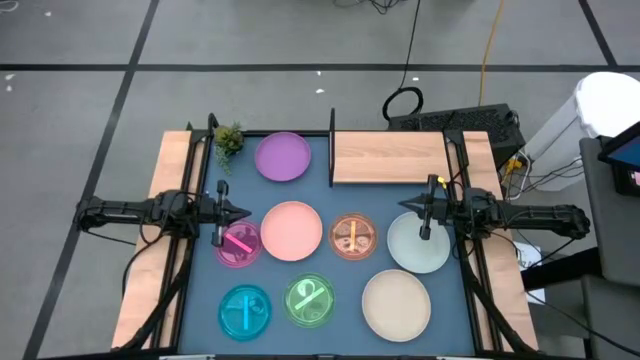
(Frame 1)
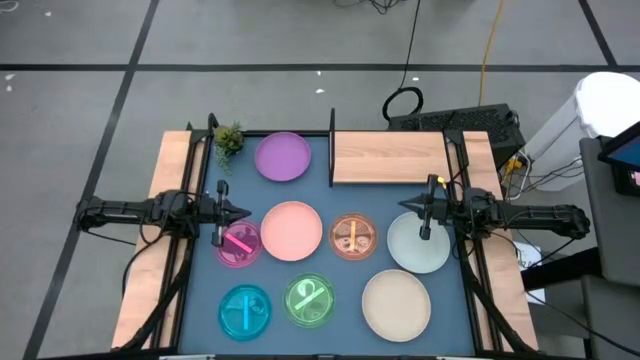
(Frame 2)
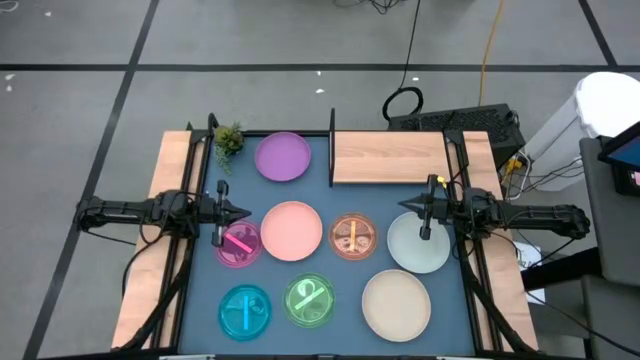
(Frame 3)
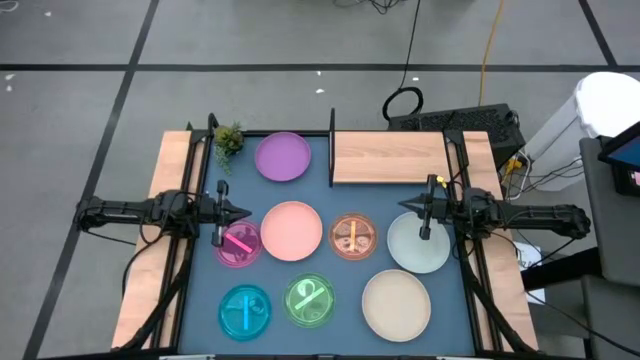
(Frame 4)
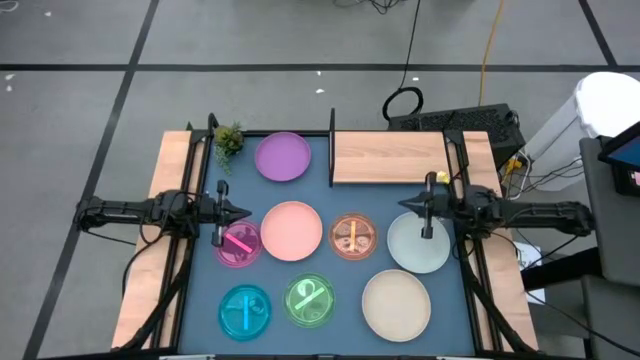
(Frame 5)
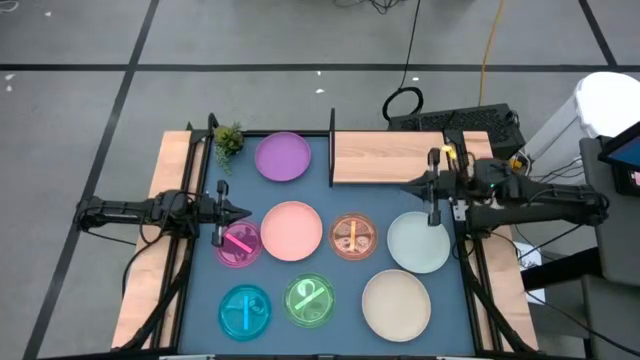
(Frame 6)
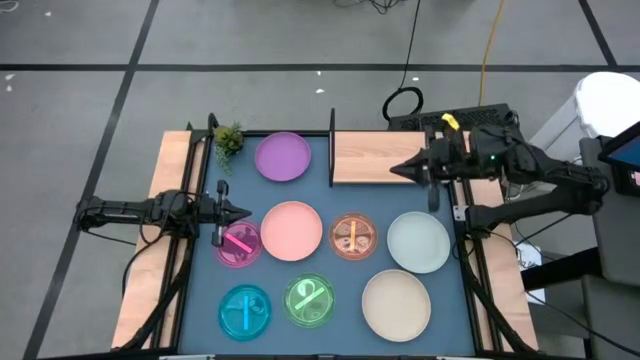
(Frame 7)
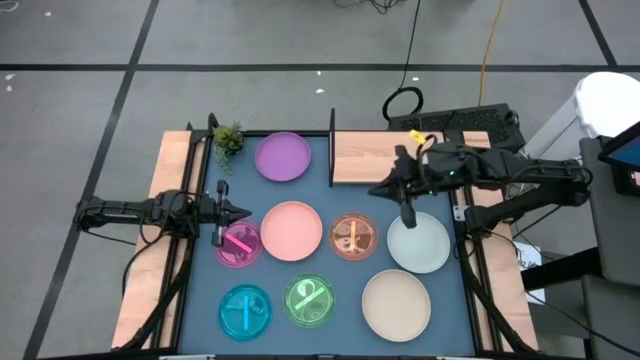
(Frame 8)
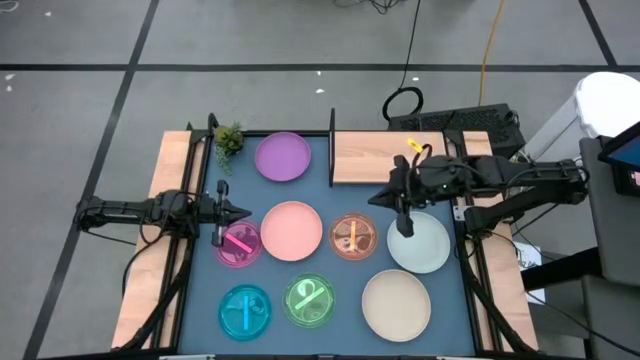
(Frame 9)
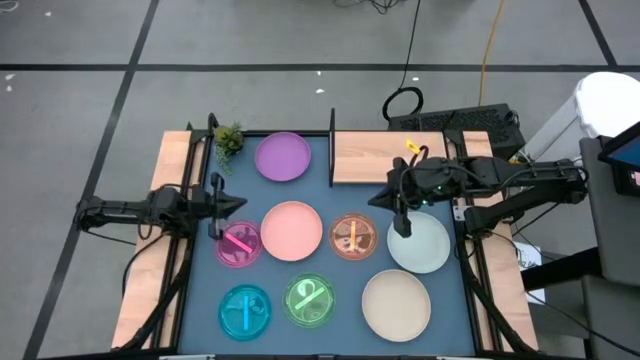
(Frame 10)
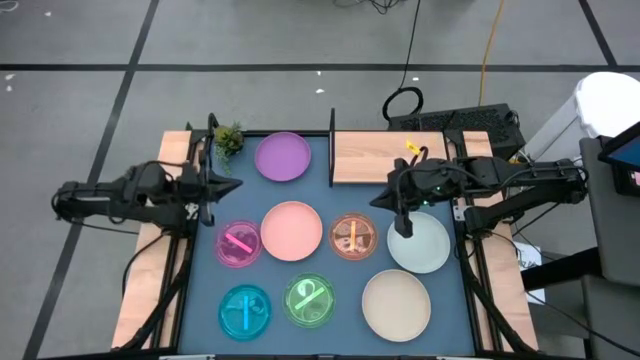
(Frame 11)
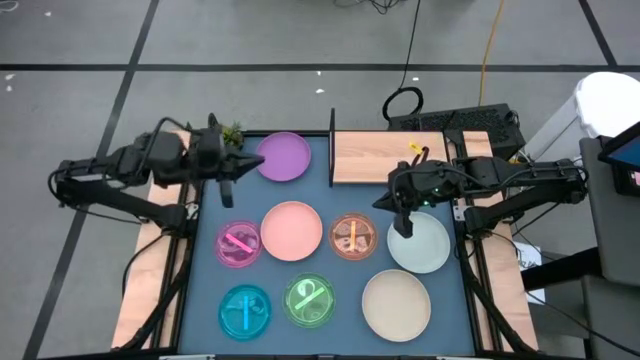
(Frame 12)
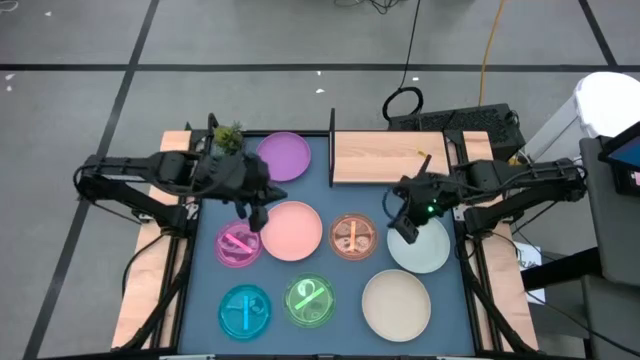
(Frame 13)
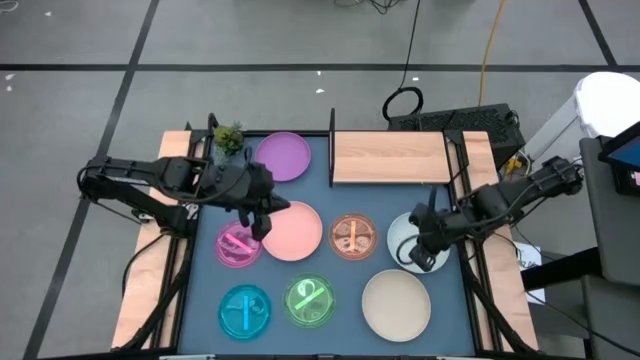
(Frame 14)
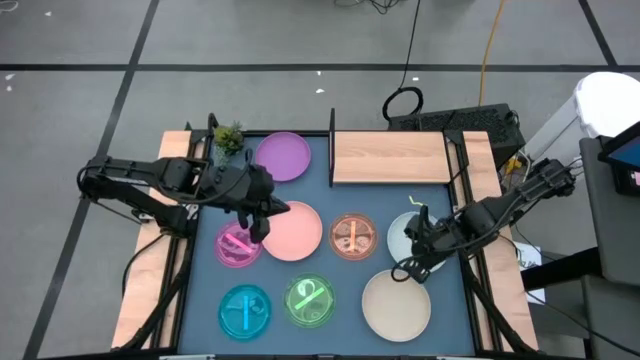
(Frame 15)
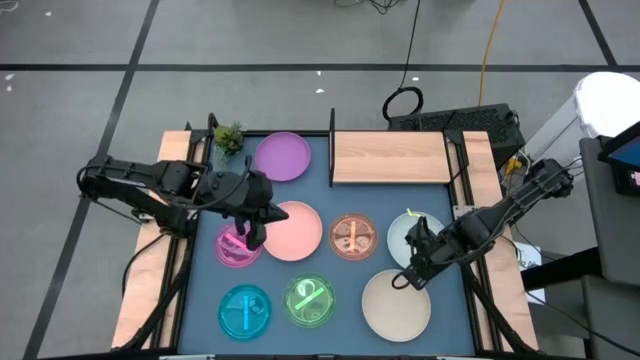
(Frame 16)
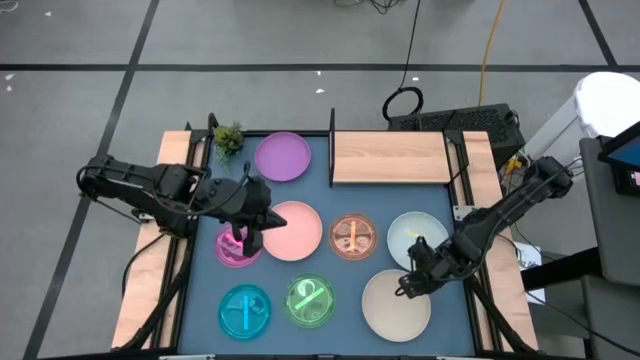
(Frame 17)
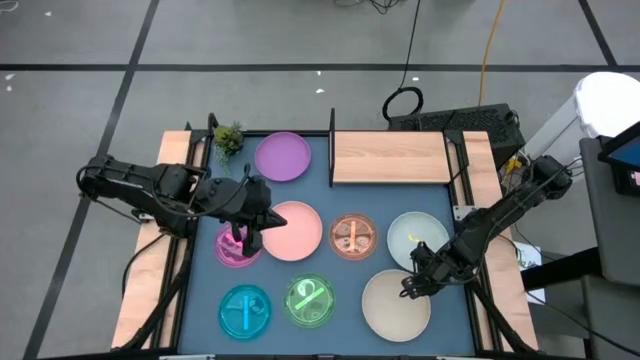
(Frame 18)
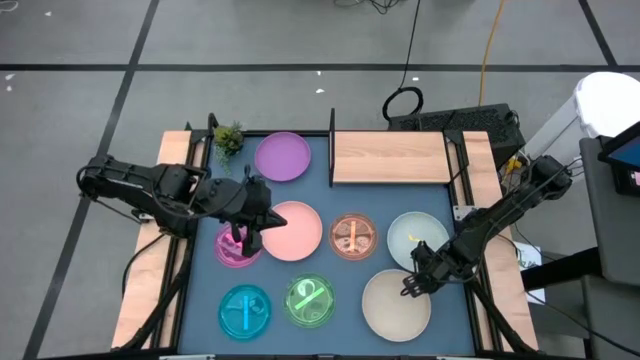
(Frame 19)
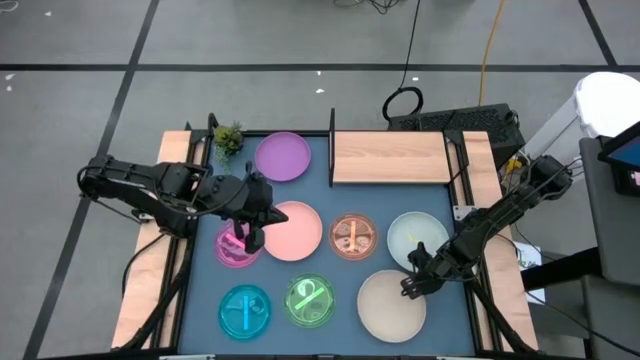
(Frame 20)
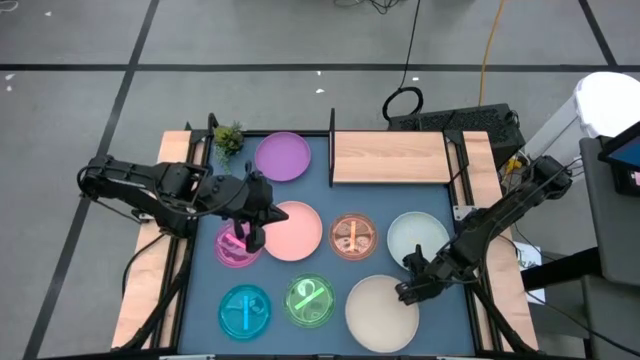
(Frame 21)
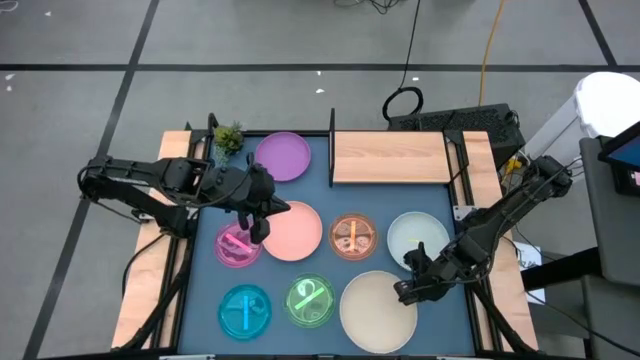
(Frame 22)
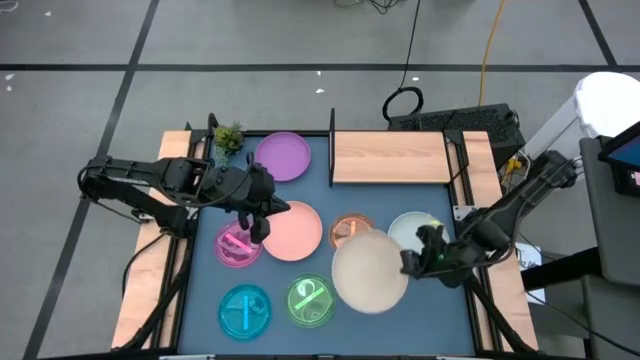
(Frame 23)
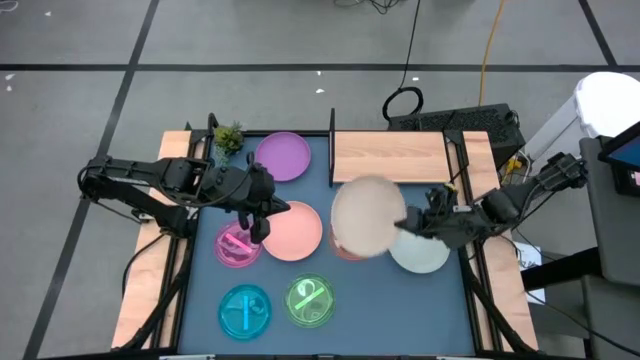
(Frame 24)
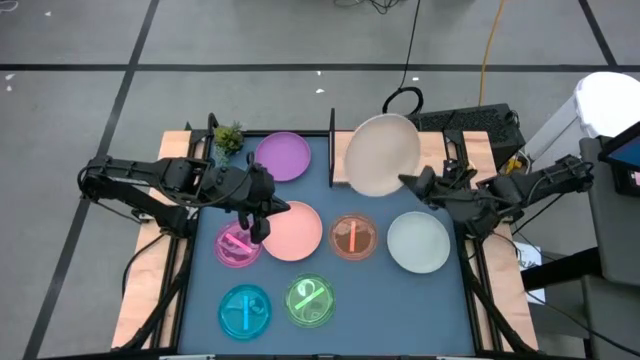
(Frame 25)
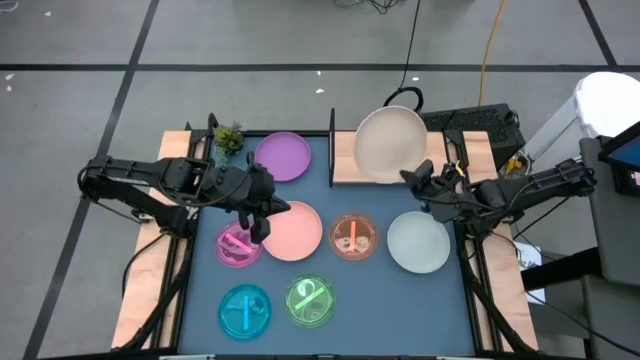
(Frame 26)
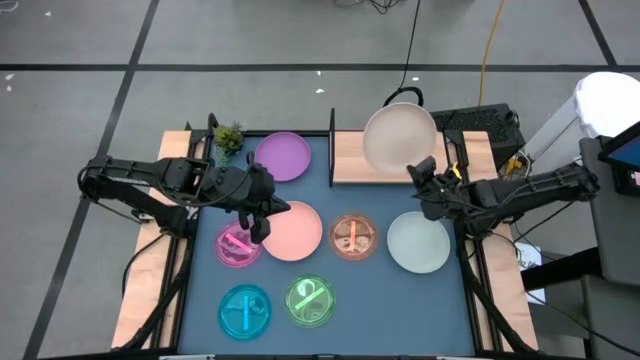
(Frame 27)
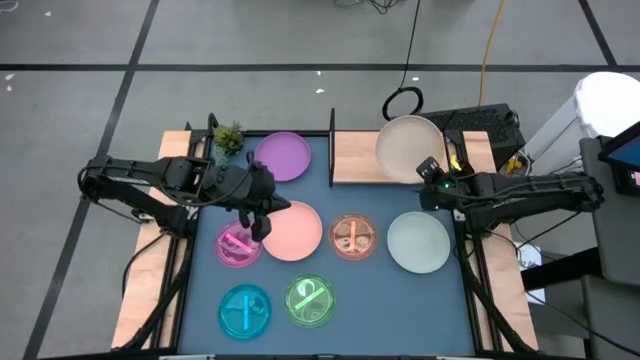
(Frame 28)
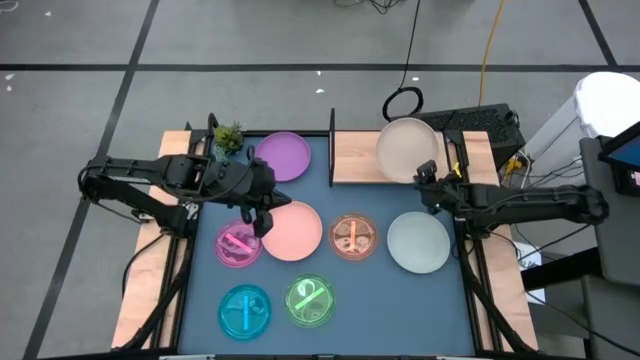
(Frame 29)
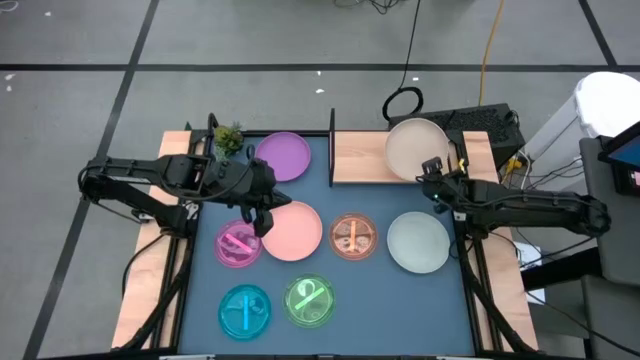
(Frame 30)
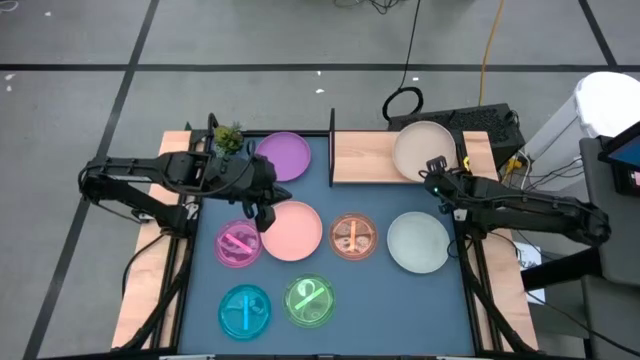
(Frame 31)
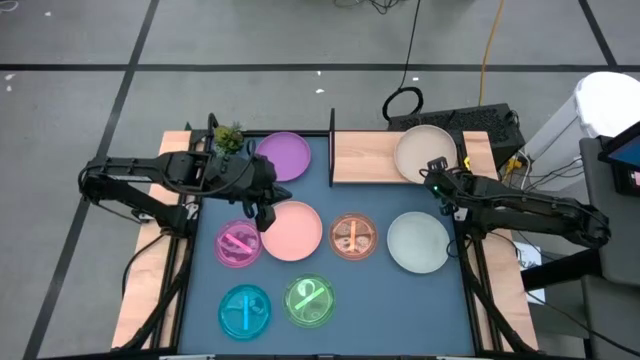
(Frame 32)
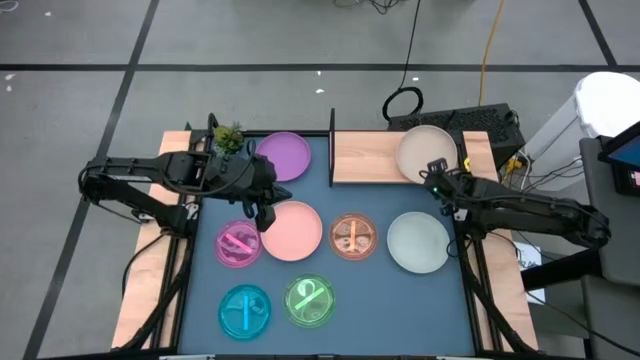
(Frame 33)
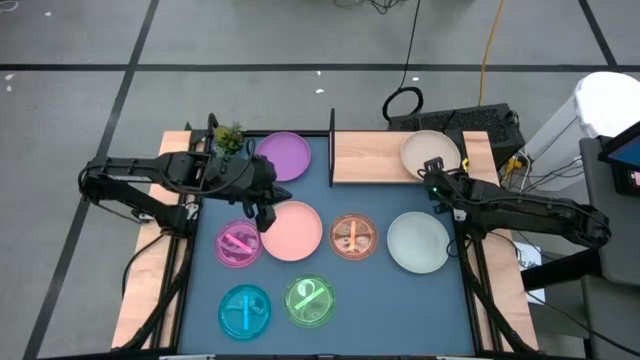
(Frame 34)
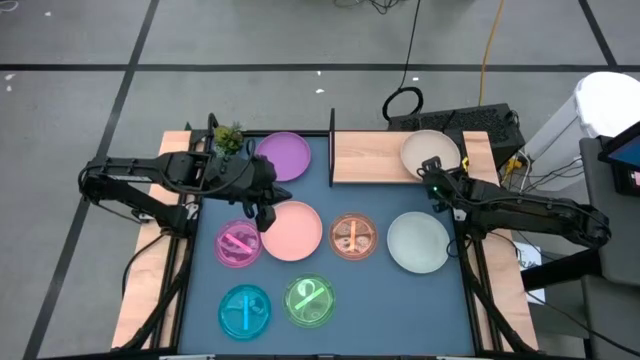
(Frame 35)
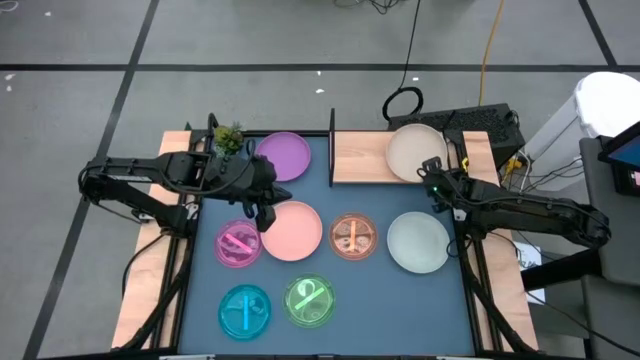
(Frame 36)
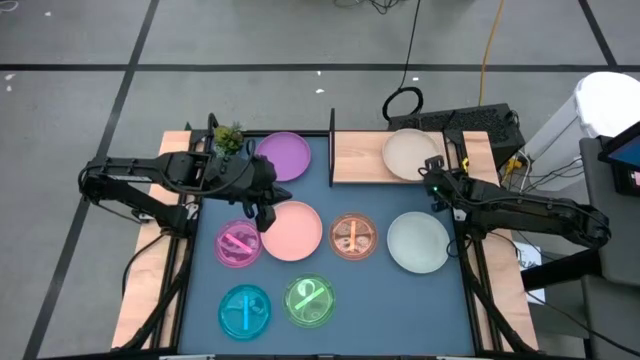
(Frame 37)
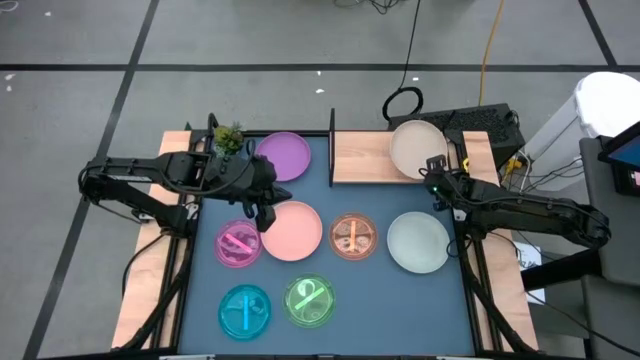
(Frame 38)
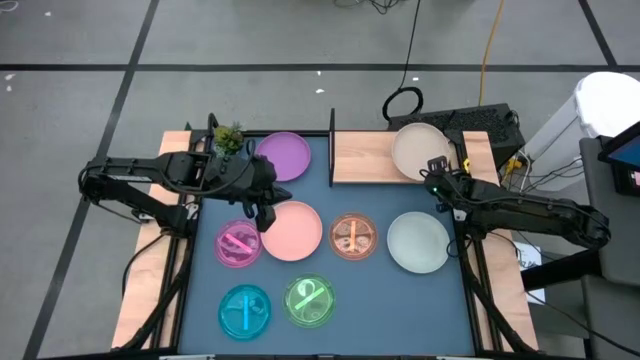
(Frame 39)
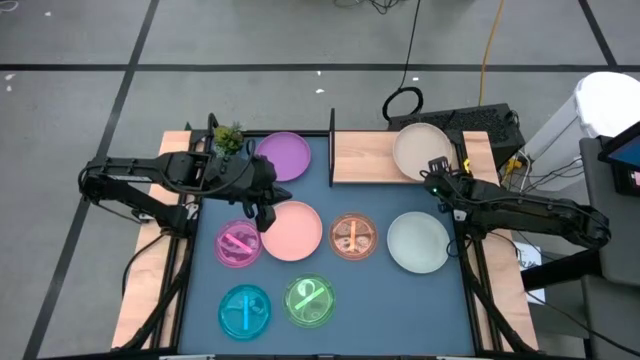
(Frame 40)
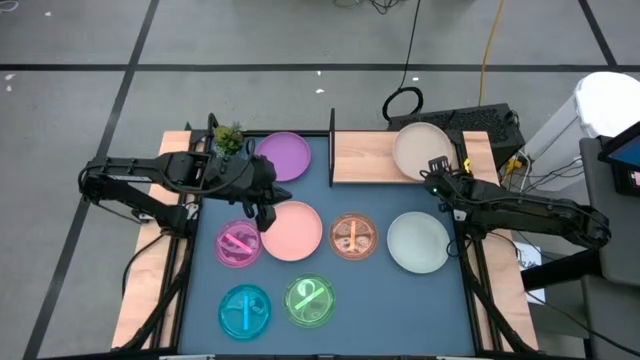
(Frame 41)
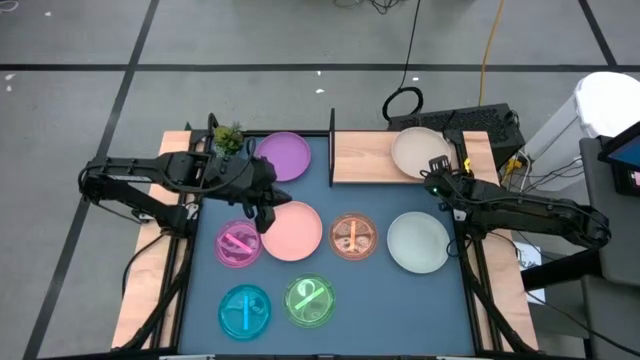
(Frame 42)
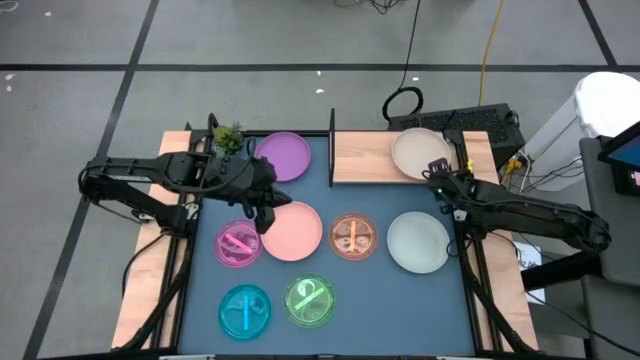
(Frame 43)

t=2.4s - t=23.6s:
Task: Place and stack plates onto a shelf
Put the gray plate on the shelf
